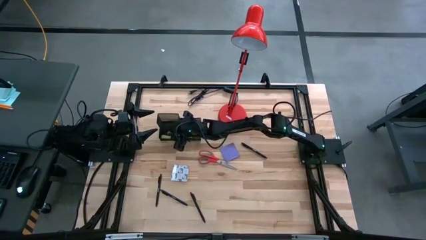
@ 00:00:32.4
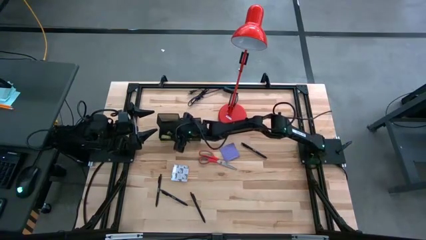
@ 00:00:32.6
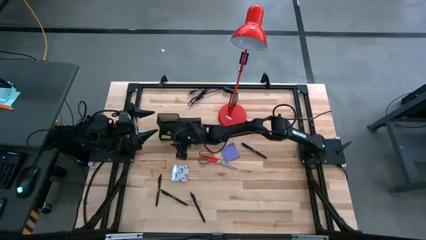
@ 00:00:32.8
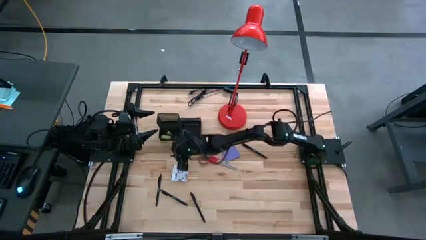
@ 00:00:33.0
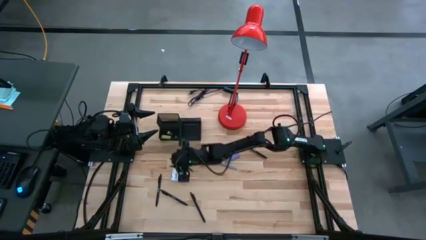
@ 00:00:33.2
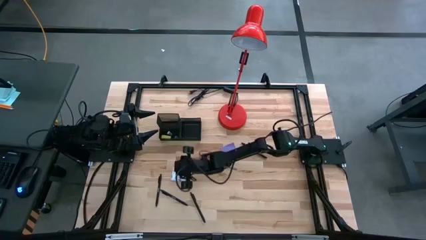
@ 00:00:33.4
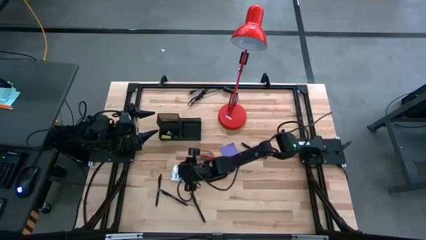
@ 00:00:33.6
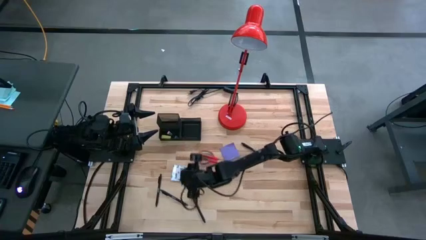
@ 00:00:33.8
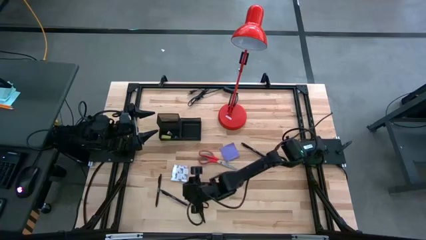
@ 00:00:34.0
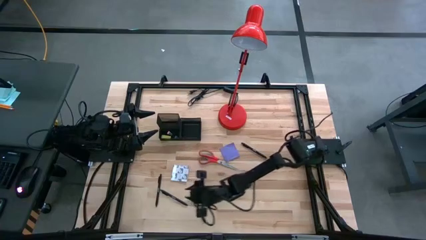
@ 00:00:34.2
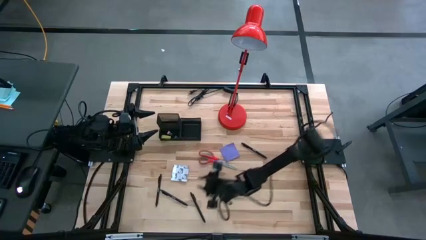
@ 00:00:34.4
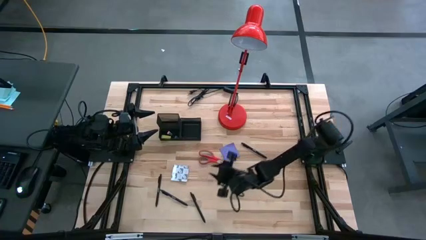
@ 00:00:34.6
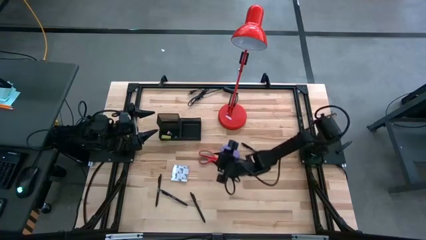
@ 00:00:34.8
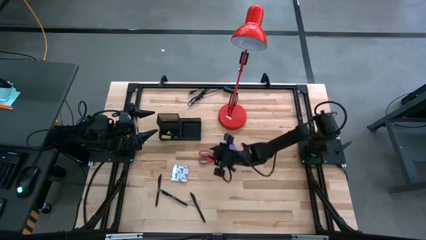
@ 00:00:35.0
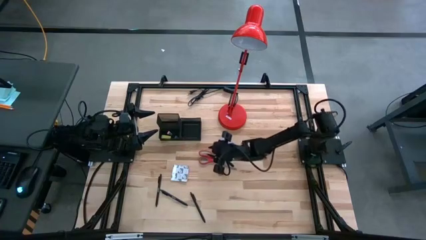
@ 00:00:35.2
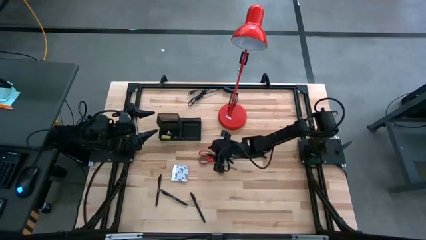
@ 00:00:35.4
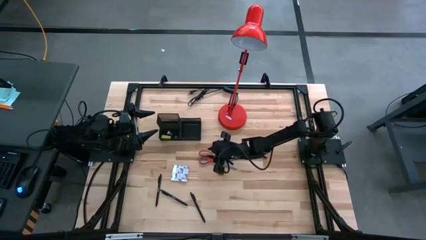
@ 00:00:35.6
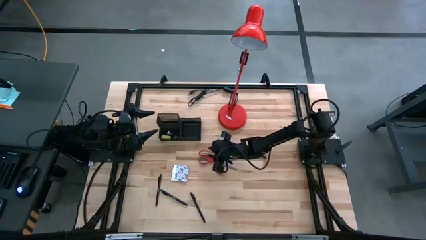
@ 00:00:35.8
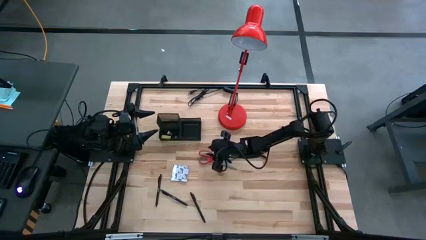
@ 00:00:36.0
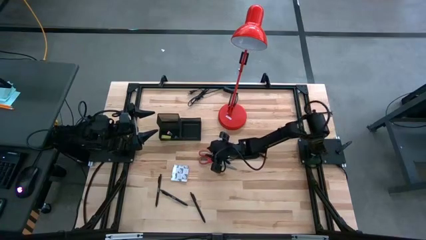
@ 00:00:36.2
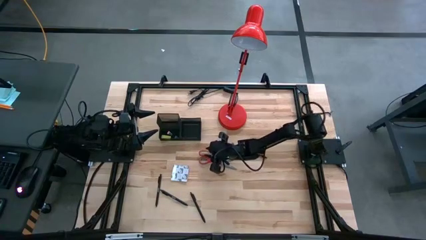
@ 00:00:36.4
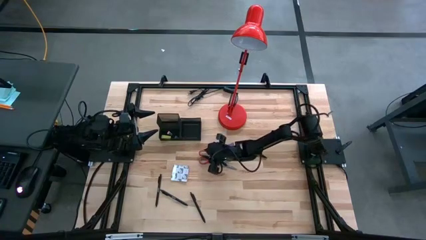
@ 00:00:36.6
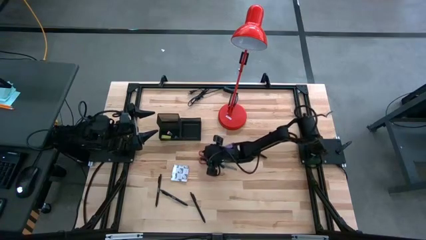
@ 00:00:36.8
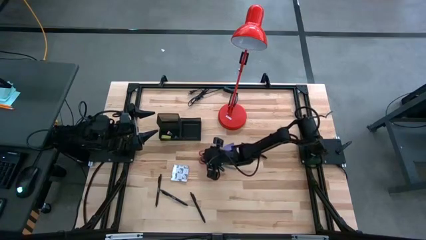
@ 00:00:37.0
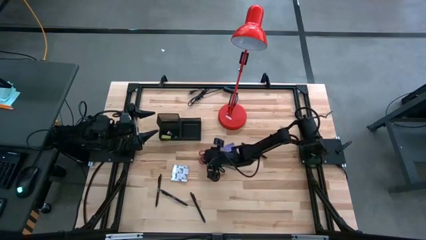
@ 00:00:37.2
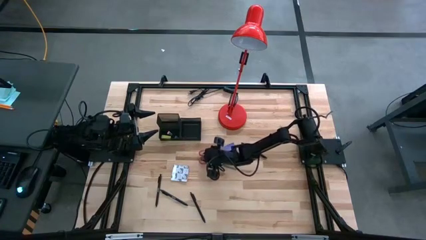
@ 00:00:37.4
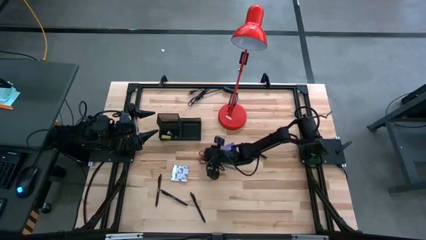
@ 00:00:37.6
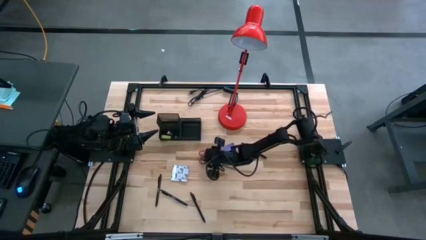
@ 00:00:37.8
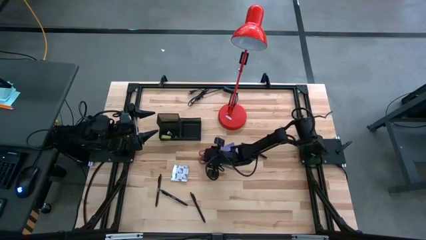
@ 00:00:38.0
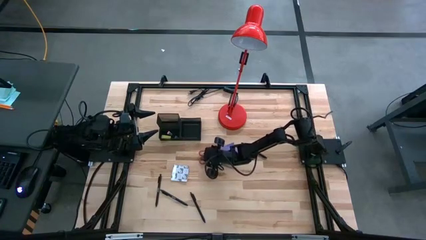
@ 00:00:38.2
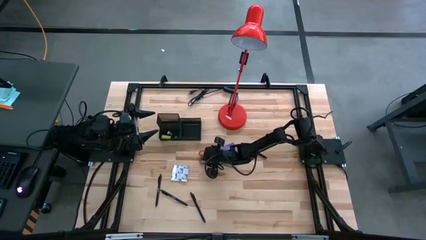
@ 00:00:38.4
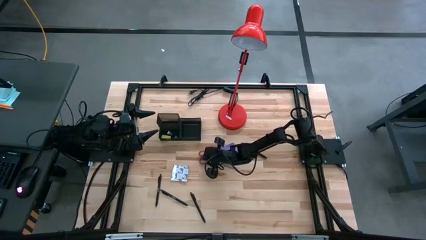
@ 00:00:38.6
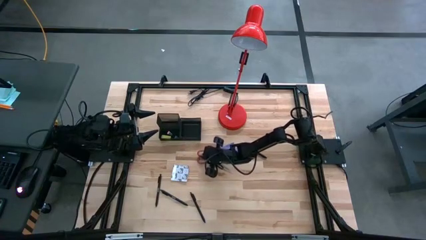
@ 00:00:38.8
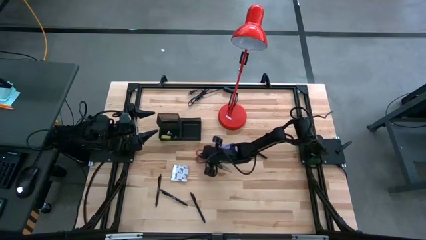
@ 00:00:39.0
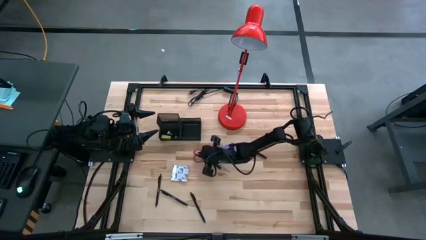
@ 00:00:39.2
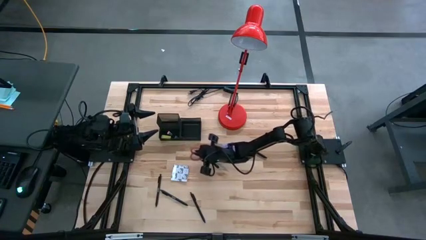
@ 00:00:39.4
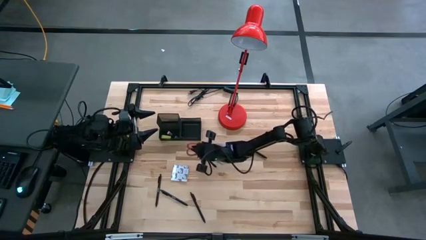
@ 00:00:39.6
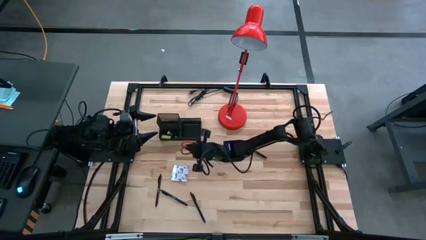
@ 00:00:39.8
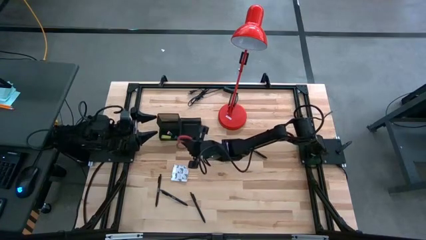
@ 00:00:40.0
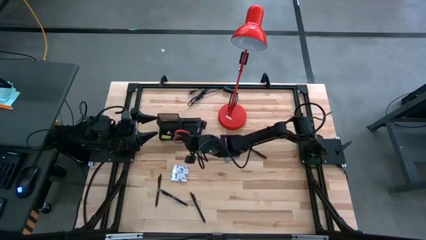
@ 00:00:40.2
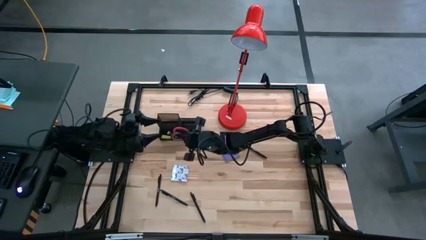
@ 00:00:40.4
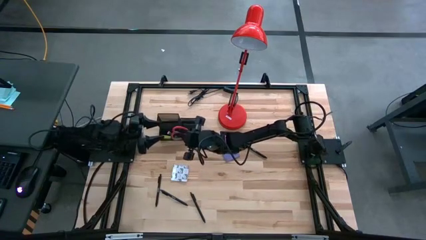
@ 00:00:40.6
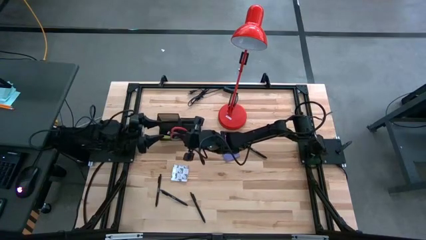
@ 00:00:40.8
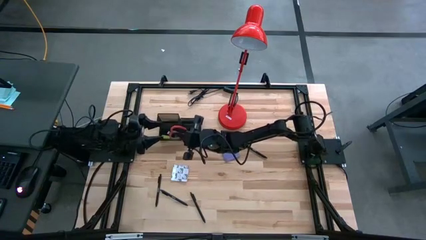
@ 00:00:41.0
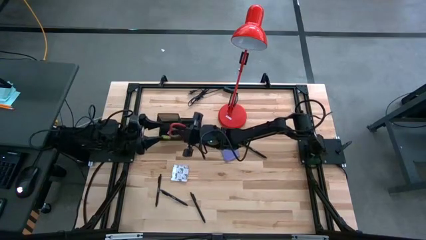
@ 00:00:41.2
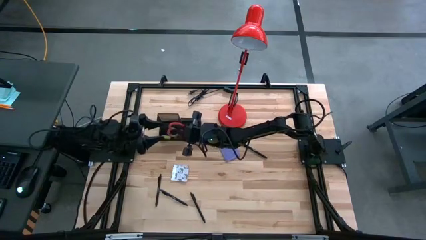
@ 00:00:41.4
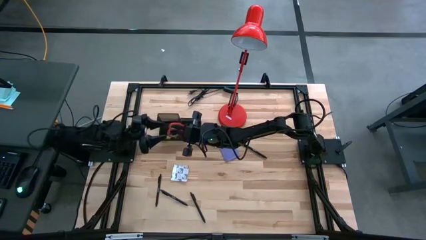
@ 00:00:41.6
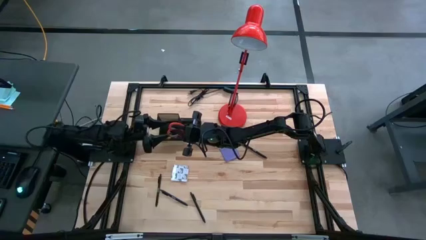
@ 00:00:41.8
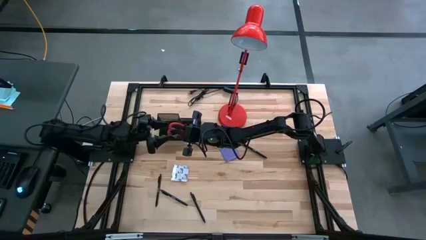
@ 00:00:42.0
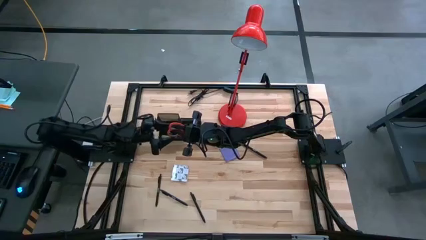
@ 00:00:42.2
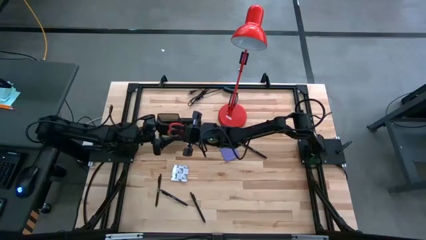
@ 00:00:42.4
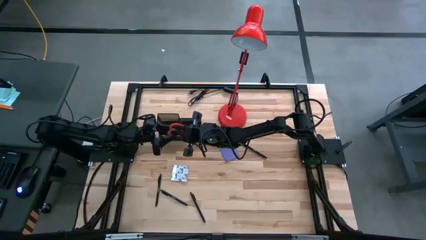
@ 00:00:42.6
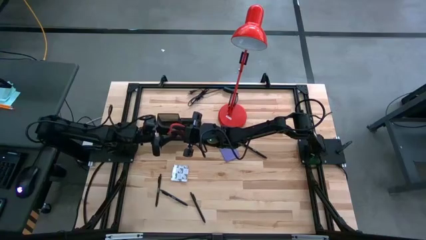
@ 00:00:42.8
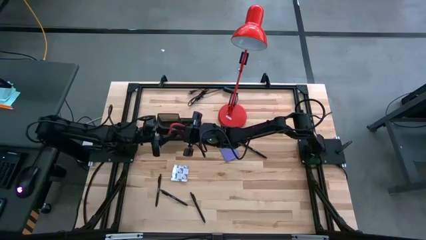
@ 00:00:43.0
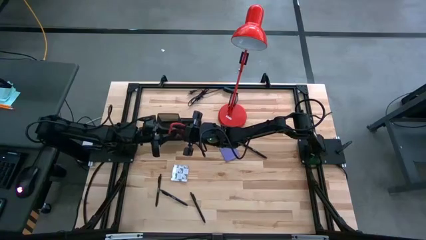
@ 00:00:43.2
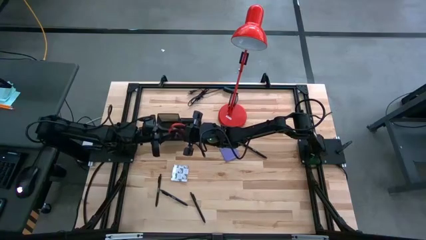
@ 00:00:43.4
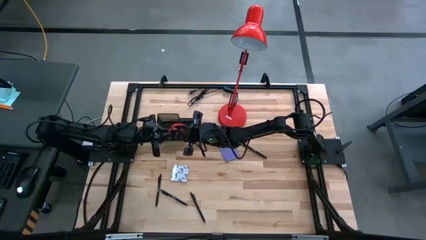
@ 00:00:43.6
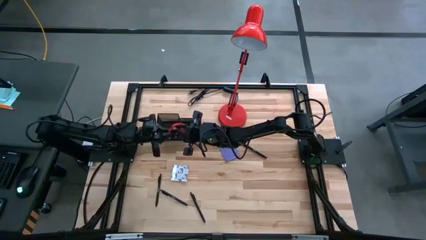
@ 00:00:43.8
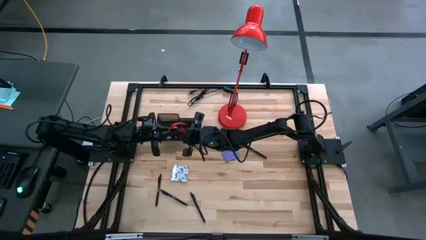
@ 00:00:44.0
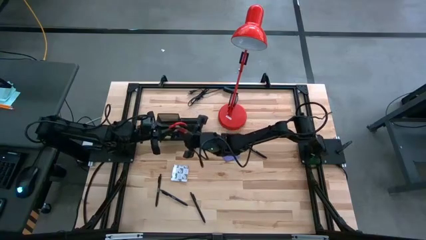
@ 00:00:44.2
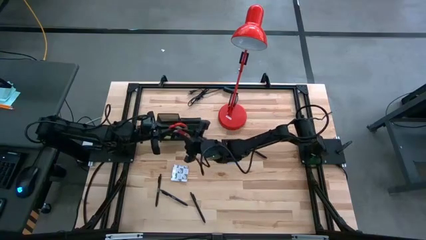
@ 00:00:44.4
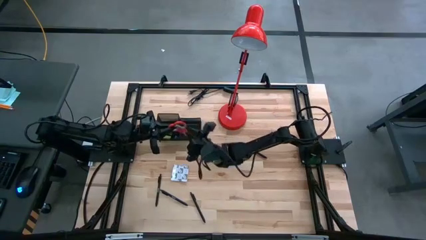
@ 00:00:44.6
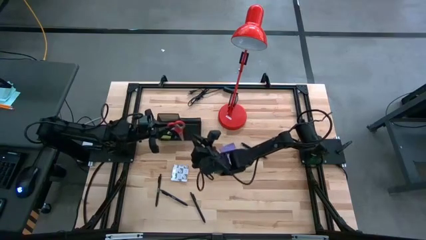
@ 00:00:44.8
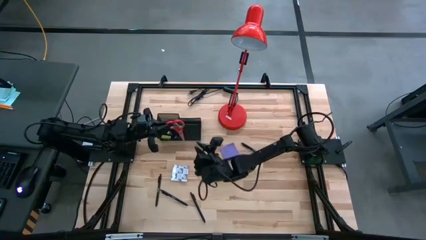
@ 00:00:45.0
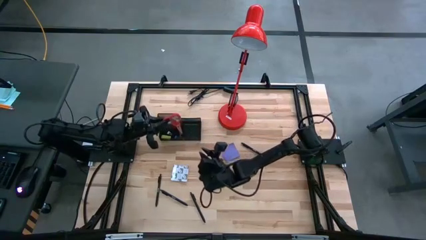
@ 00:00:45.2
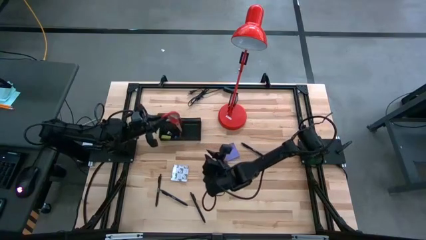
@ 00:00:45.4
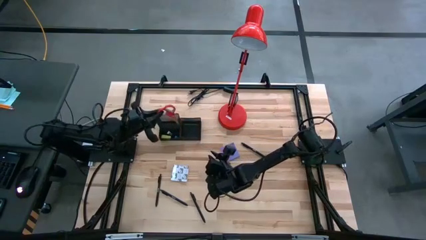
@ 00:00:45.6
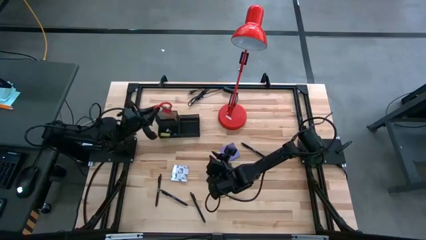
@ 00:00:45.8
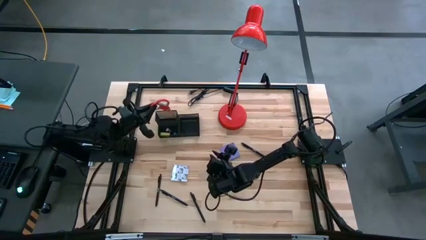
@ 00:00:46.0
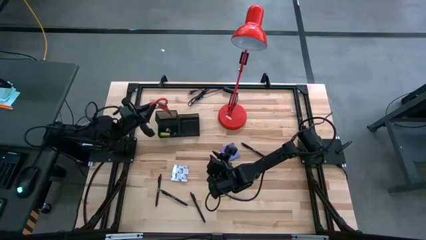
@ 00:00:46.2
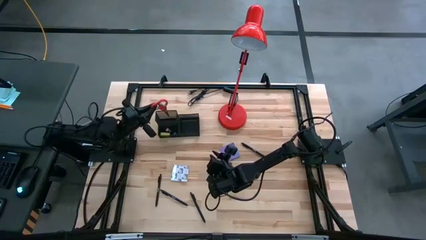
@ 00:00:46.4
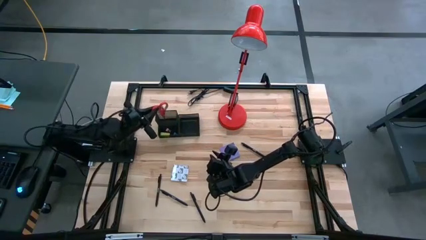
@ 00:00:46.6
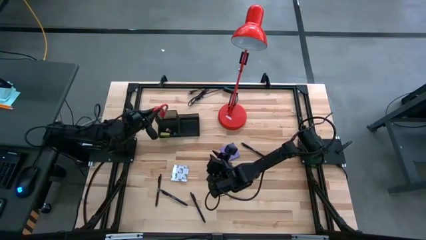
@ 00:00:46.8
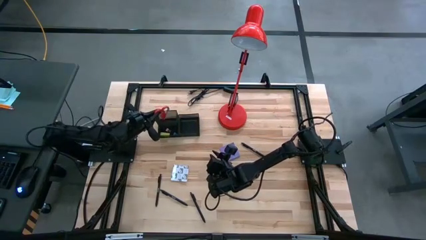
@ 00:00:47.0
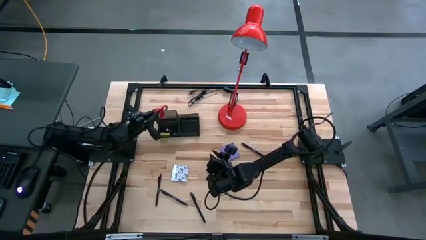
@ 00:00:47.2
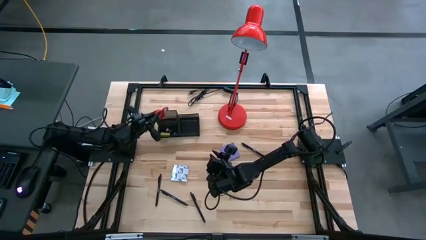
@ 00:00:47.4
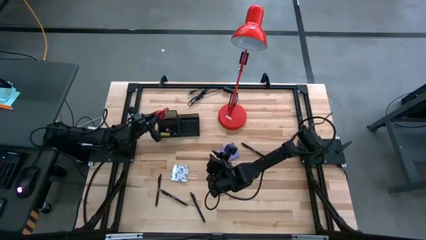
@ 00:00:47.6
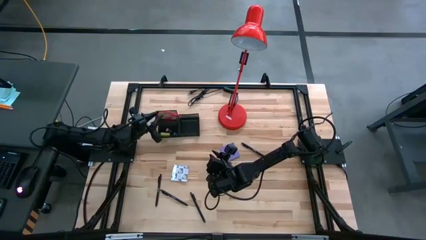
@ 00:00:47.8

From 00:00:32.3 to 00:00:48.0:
Task: Pick and place office supplies into organizer
Put the red scissors into the black desk organizer
